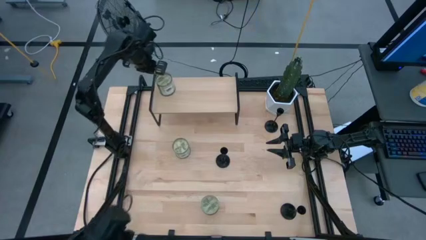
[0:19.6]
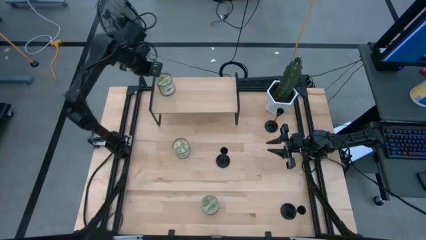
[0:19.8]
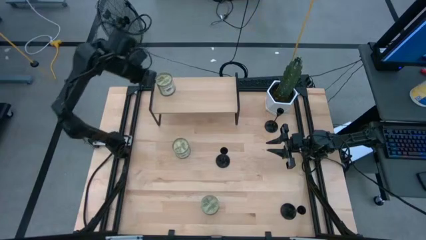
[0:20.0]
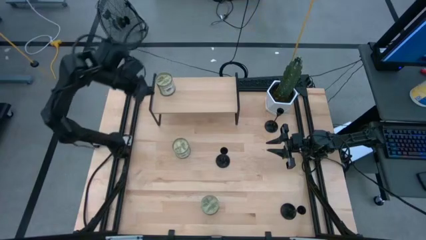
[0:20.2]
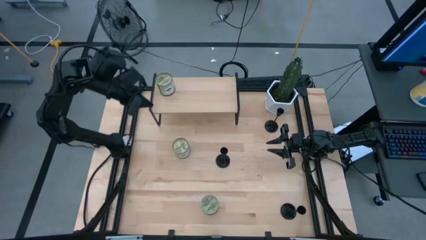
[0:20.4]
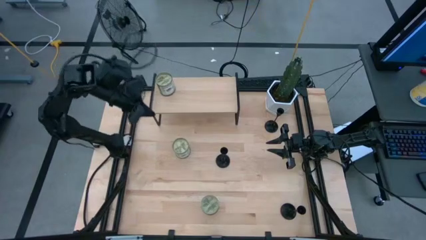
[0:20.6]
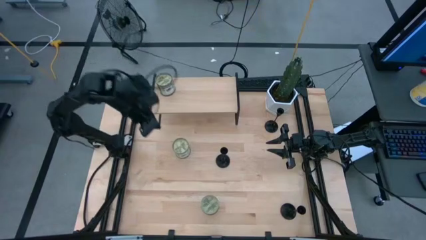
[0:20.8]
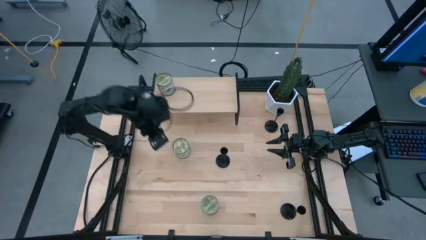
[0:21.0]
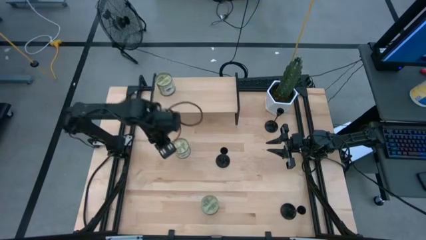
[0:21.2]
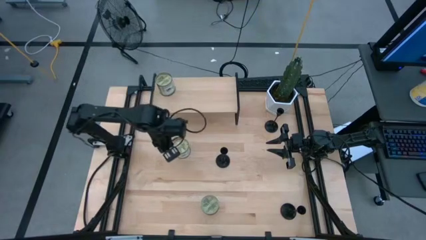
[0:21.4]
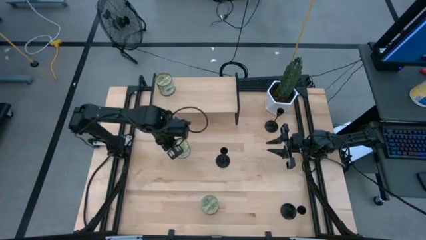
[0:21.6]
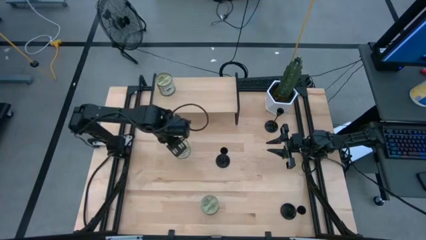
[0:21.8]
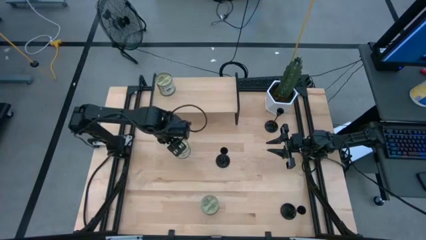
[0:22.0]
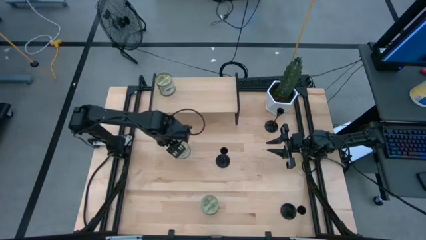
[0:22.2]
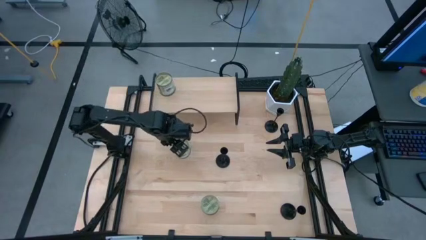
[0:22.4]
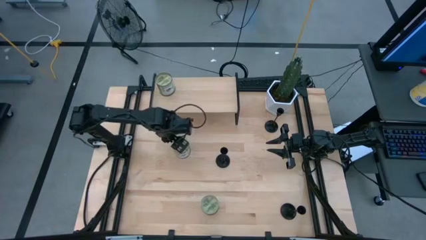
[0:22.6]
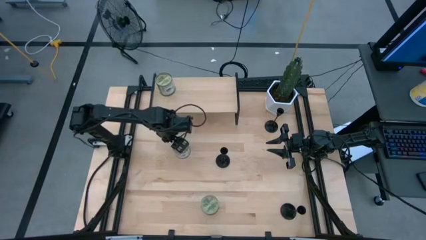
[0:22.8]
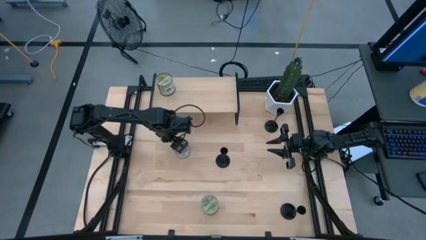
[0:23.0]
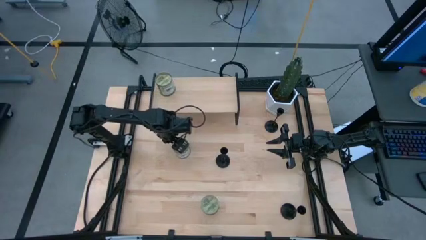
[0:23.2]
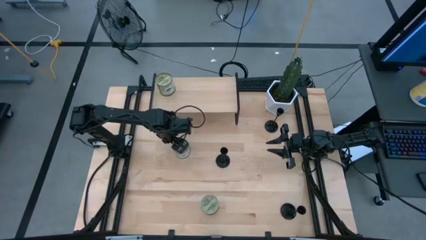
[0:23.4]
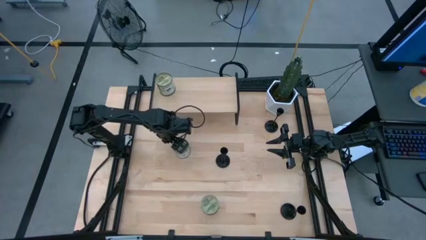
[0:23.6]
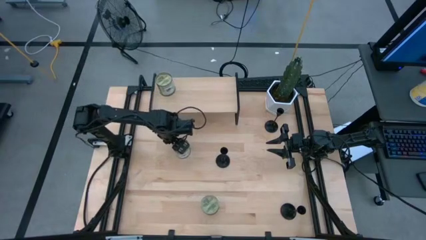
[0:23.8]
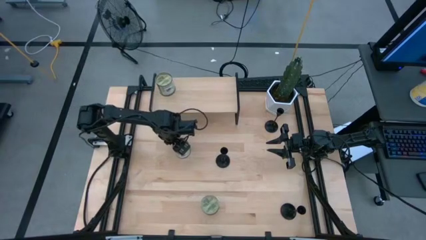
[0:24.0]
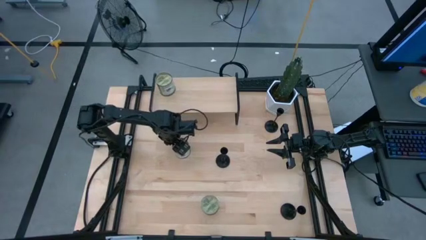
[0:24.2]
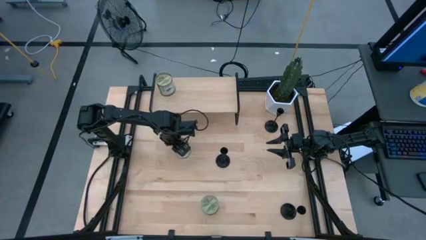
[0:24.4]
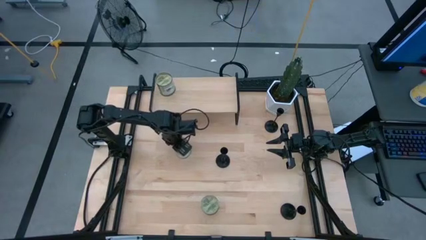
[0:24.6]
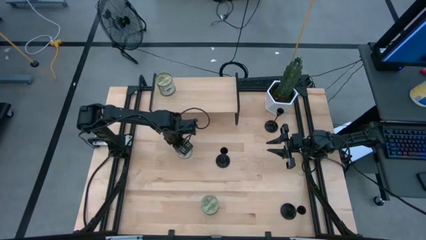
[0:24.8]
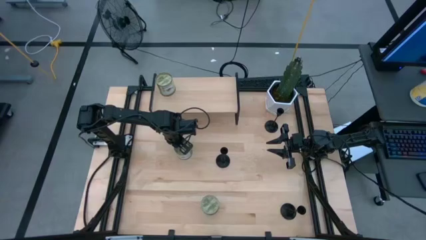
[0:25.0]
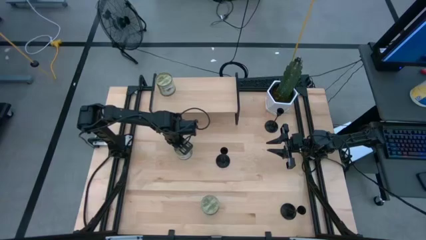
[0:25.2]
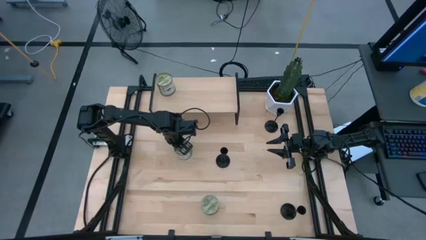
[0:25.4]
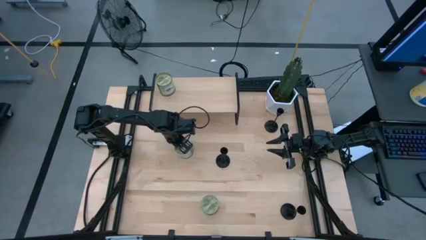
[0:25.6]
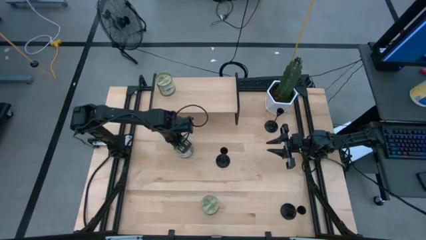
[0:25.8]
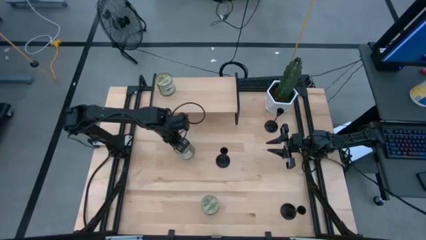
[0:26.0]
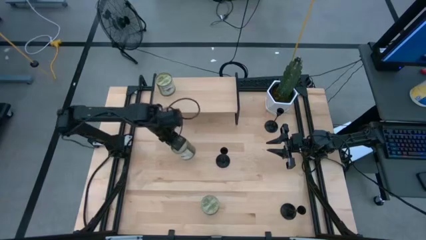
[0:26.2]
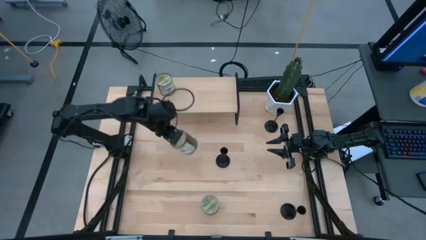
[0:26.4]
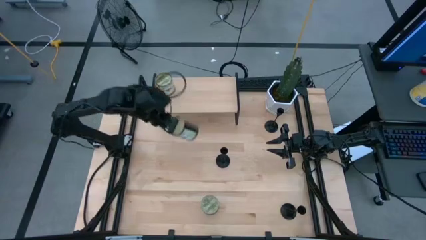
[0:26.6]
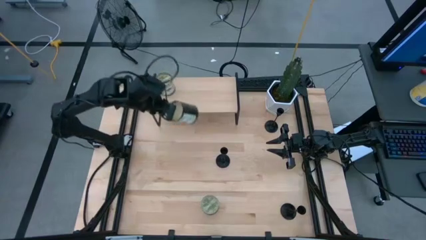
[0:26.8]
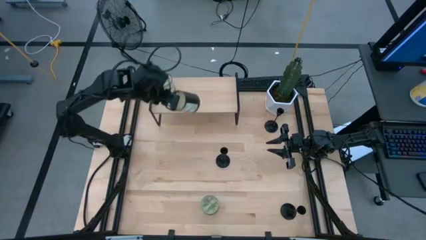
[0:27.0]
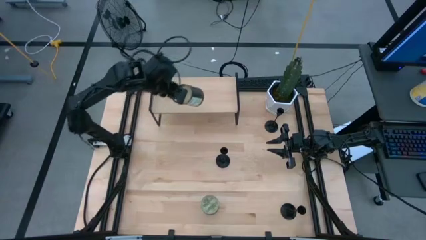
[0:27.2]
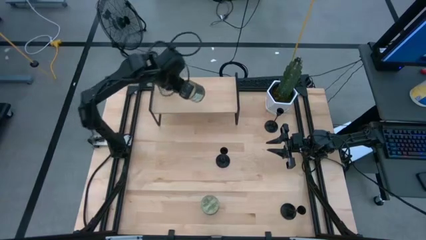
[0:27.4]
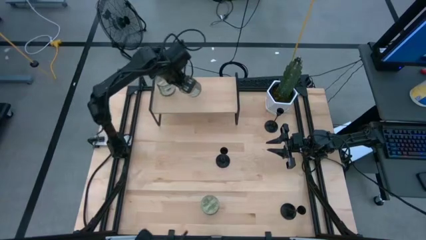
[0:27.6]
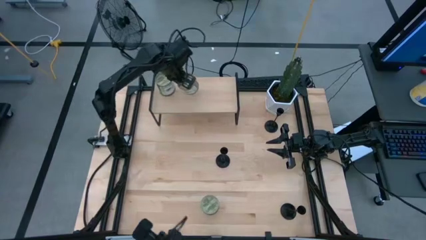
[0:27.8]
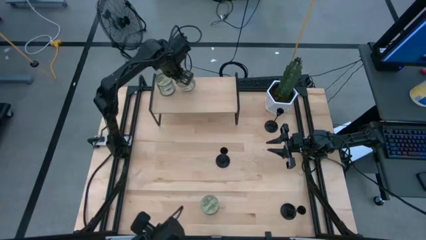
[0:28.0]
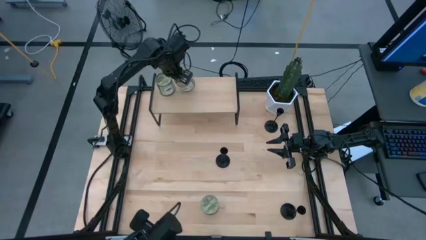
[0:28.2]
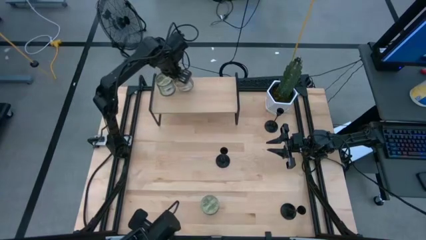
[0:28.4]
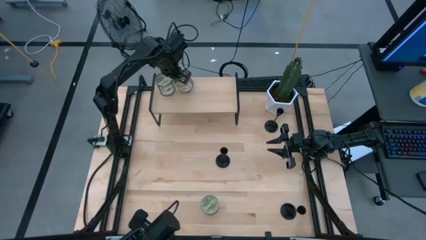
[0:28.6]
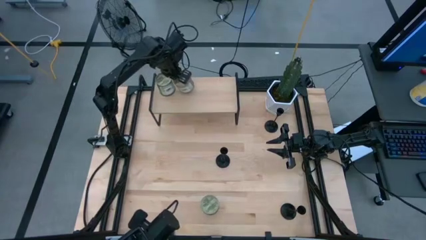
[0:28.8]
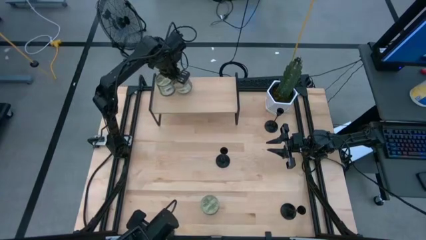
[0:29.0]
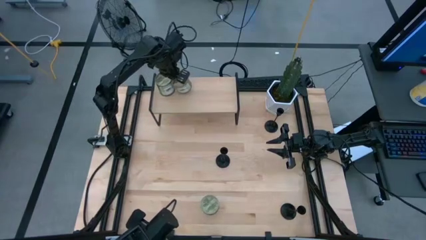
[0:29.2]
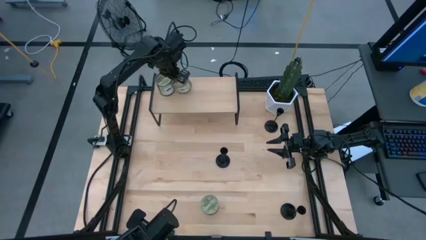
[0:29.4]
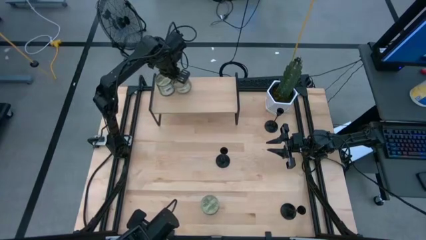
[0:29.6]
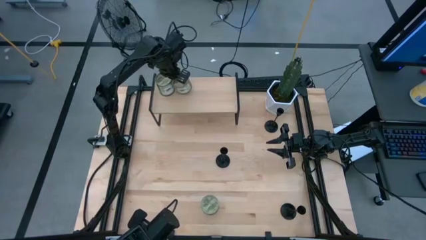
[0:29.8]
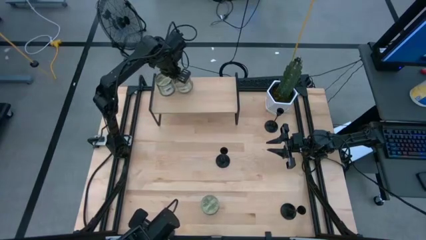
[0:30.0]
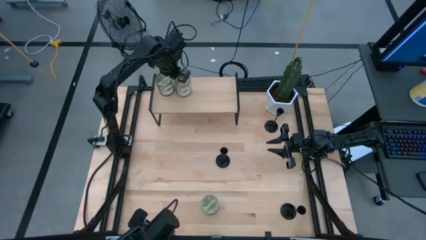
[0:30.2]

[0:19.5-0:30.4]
Task: Pick & Place candle stick holders
Put the top green scented candle on the shelf
